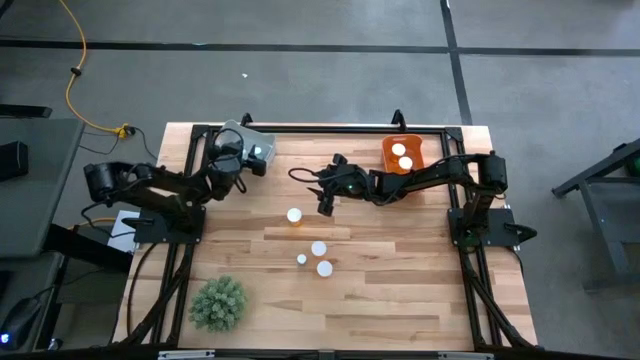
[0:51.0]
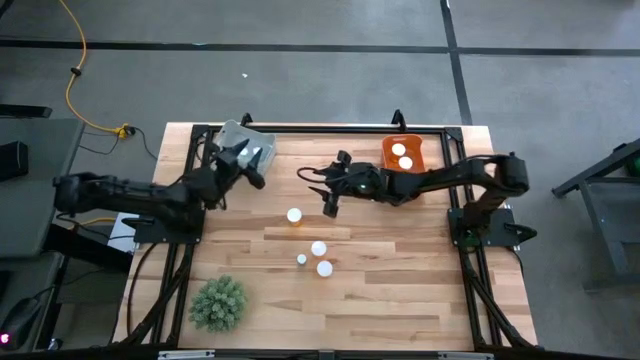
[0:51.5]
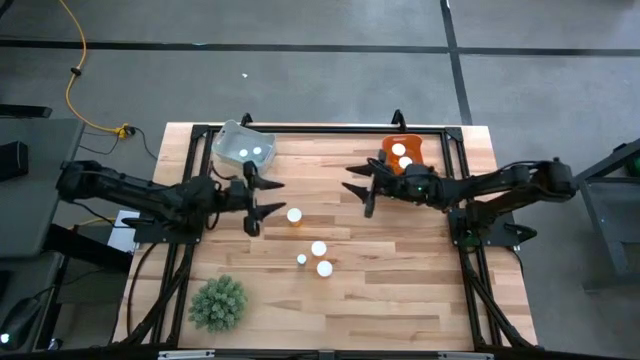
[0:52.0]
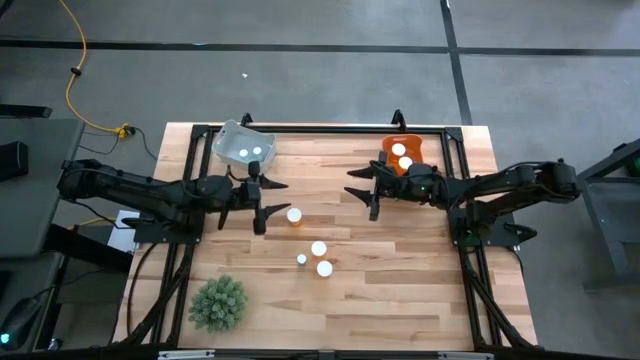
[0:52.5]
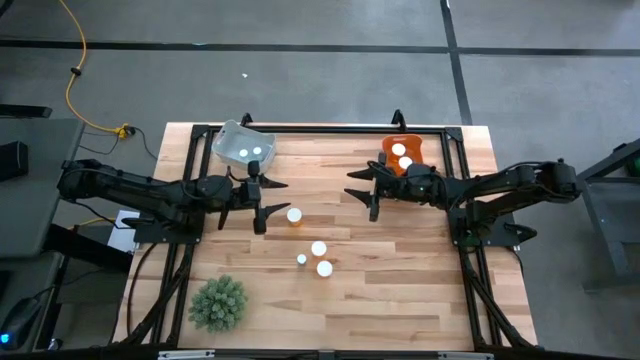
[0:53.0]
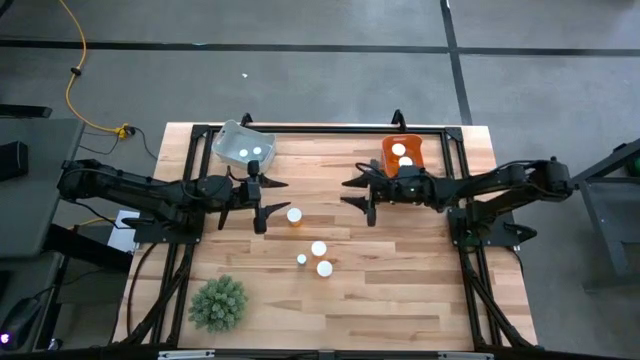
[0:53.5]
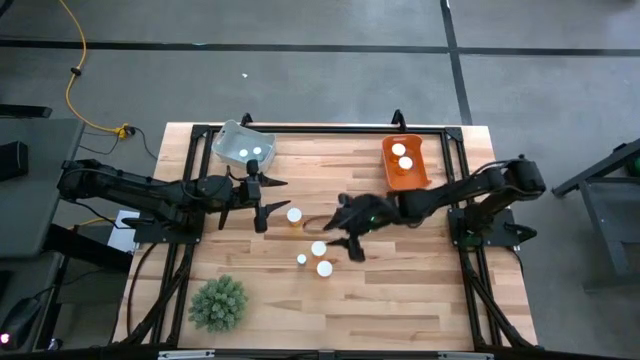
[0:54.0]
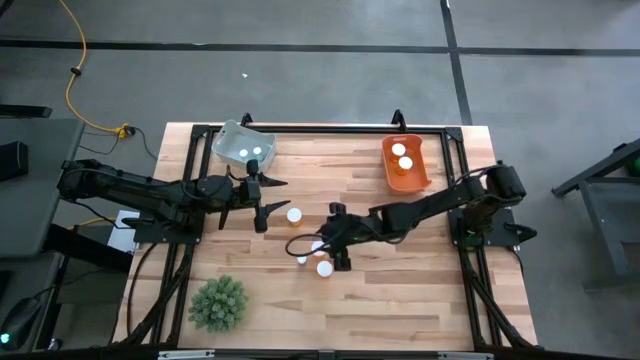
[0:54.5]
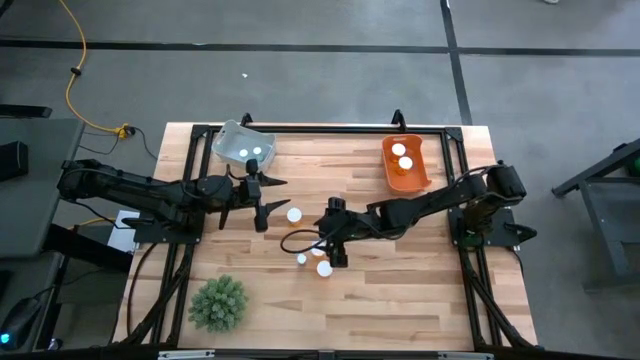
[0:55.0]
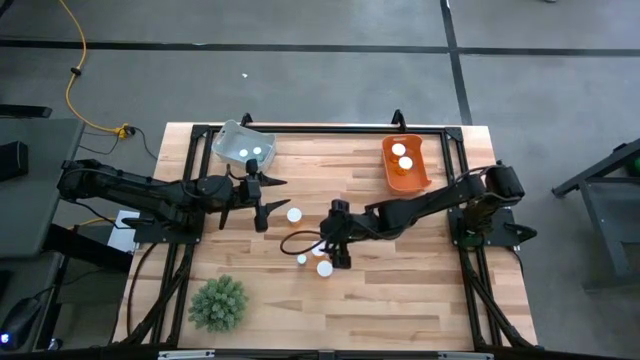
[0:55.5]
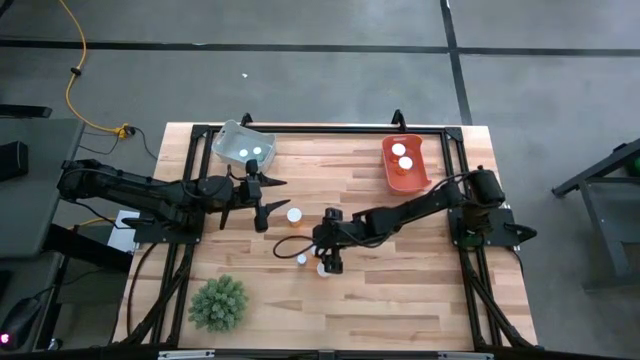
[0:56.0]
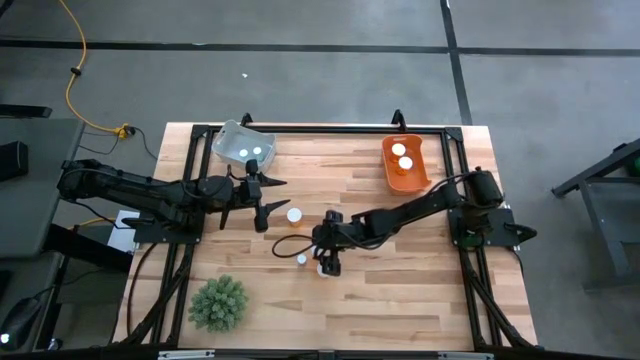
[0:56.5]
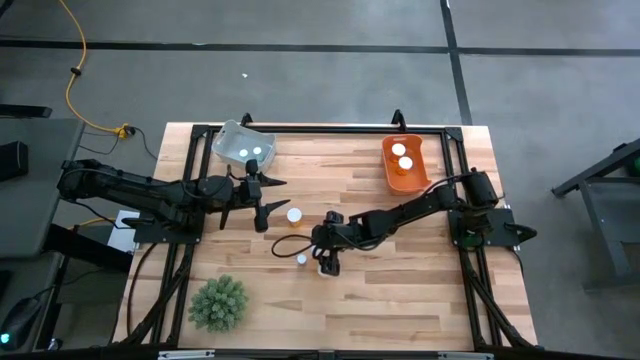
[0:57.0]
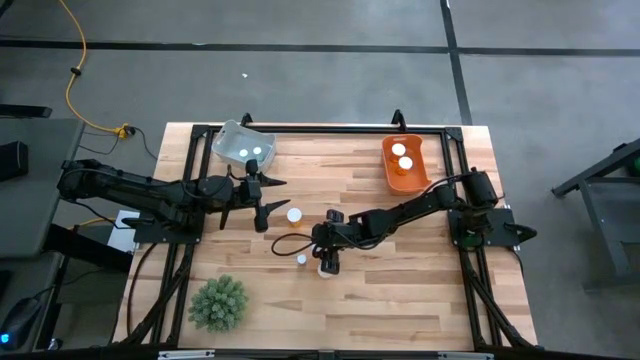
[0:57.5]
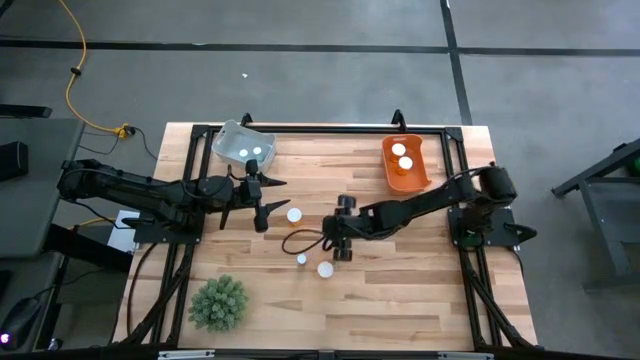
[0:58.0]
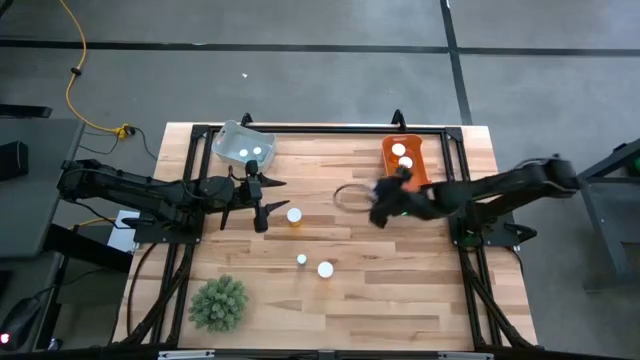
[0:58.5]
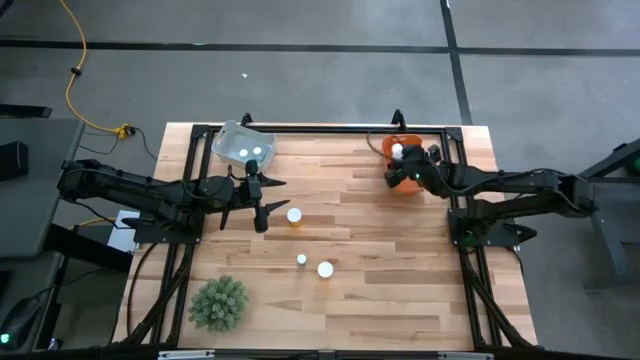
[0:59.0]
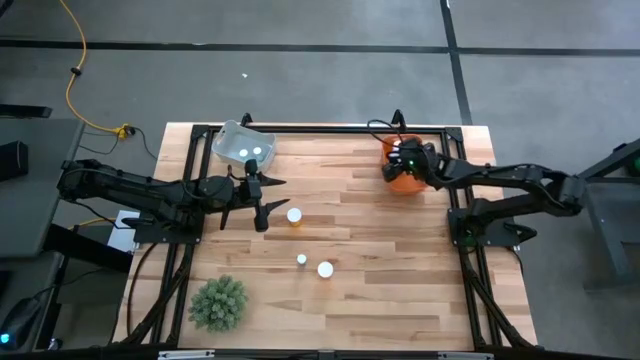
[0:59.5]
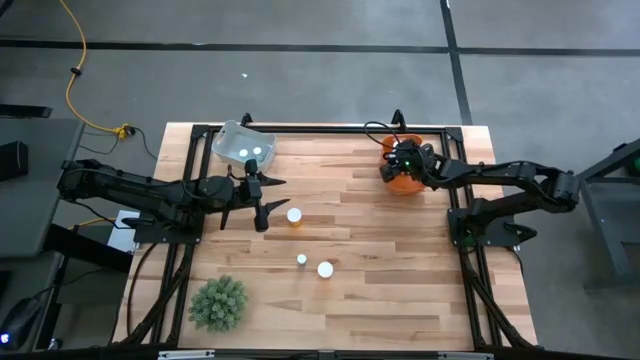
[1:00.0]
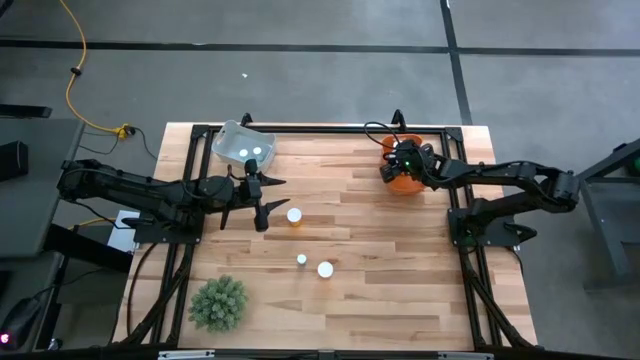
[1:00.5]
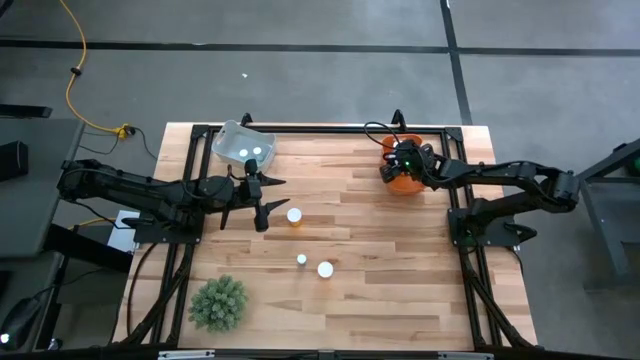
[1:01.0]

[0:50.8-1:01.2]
Task: Pick and place medicine bottles into bin by pill shape (circle, oval)
Put the middle orange capsule bottle into the orange bin
